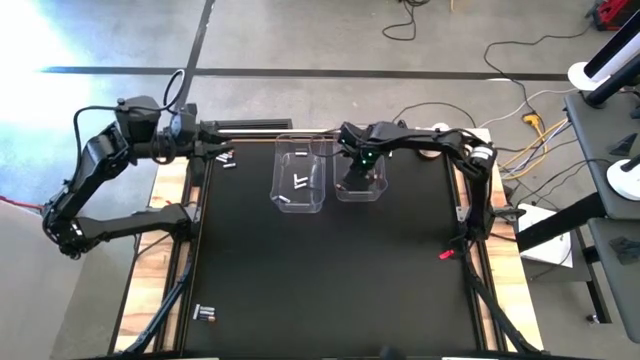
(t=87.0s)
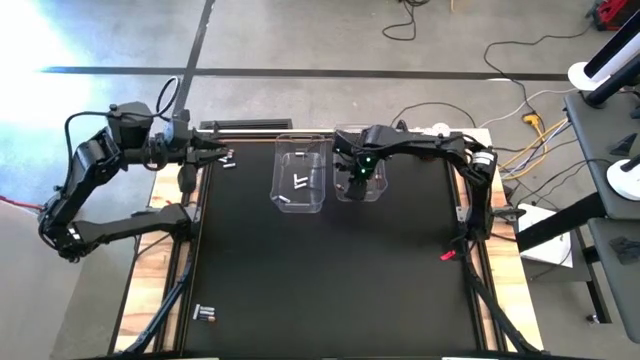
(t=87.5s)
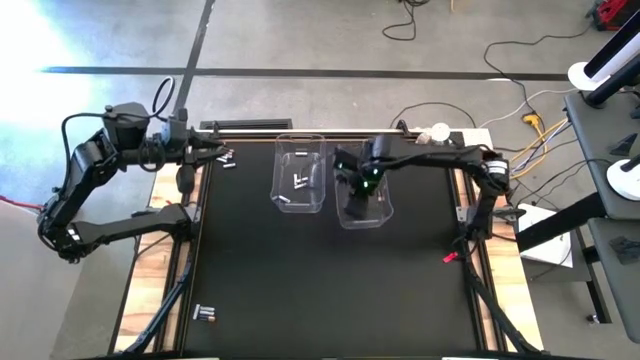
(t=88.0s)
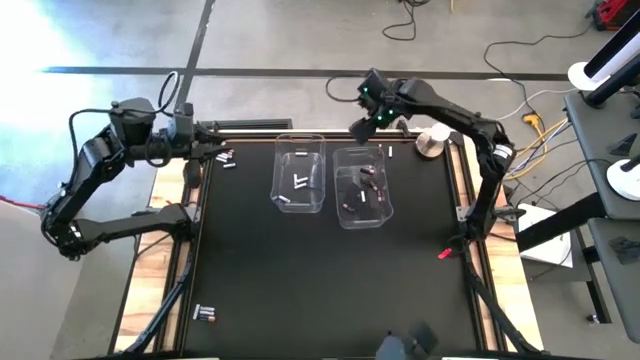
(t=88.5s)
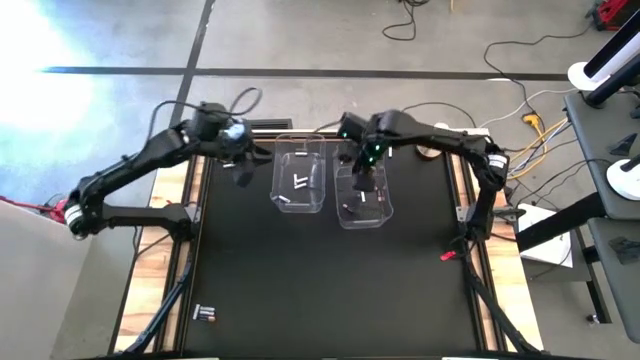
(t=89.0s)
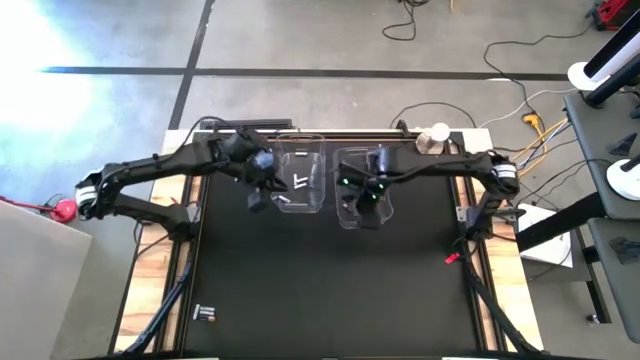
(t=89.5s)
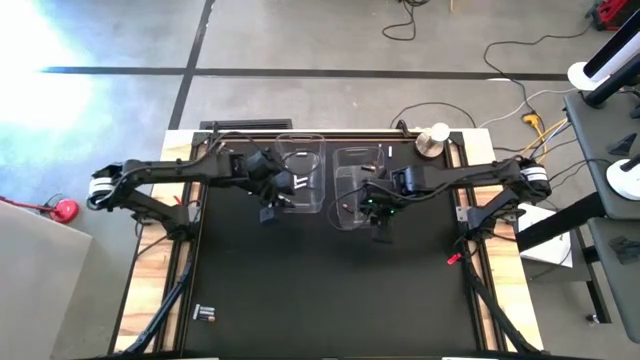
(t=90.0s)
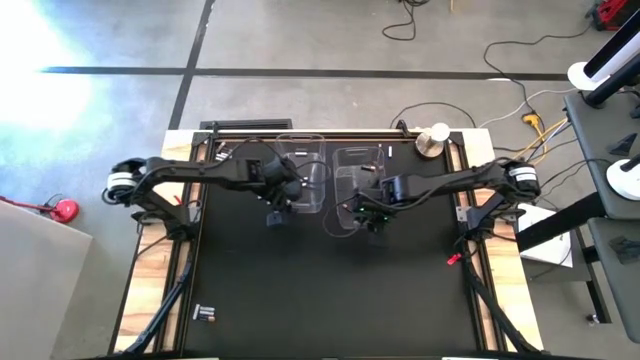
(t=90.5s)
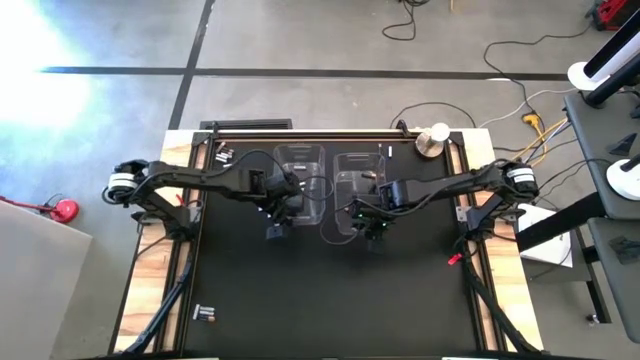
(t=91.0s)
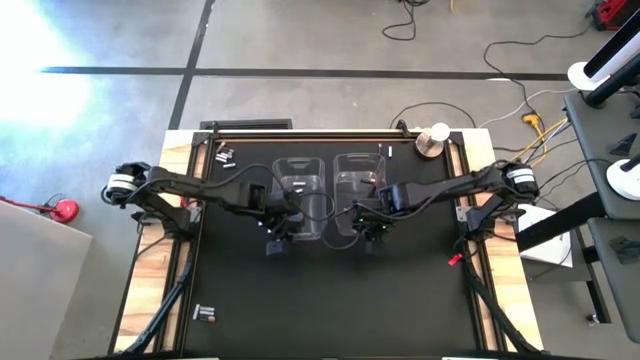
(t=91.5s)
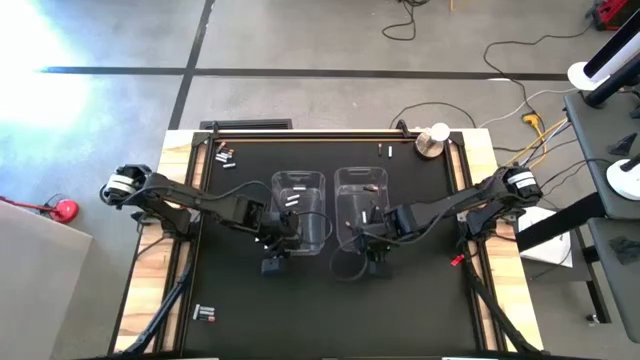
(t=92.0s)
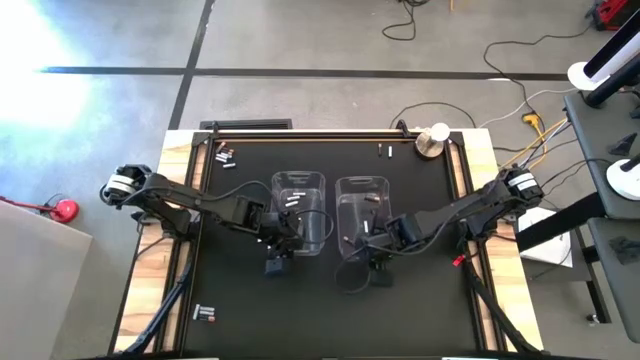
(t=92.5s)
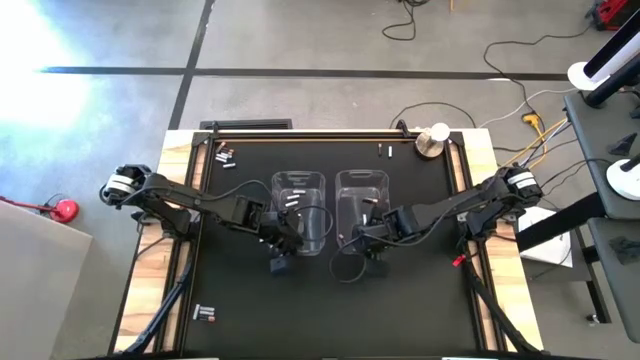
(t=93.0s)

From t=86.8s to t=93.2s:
Task: Sort batteries
Adjust the transparent bins

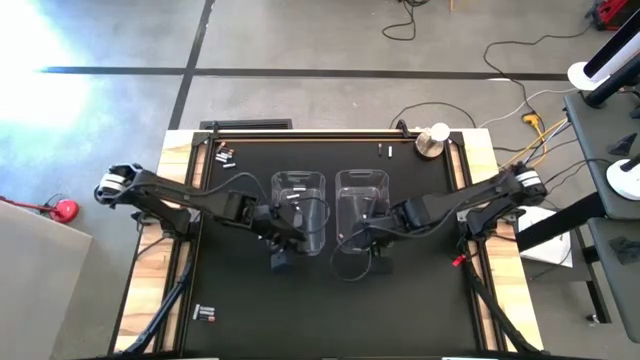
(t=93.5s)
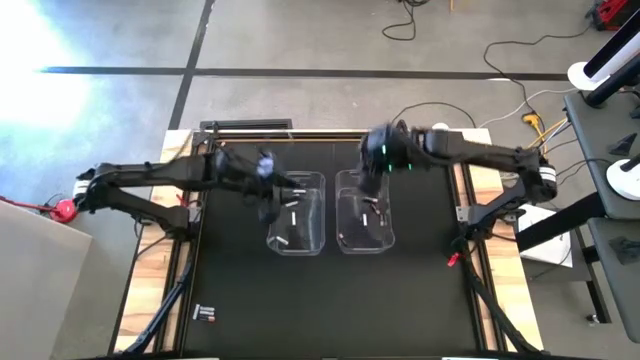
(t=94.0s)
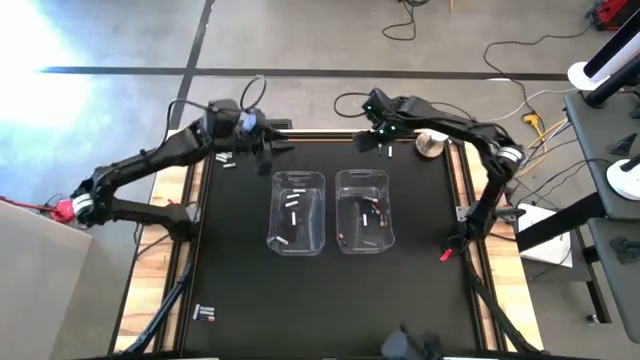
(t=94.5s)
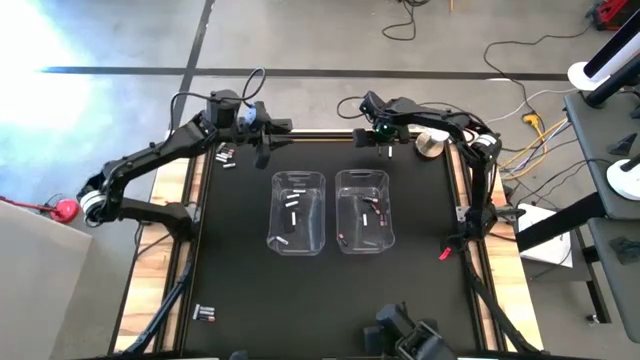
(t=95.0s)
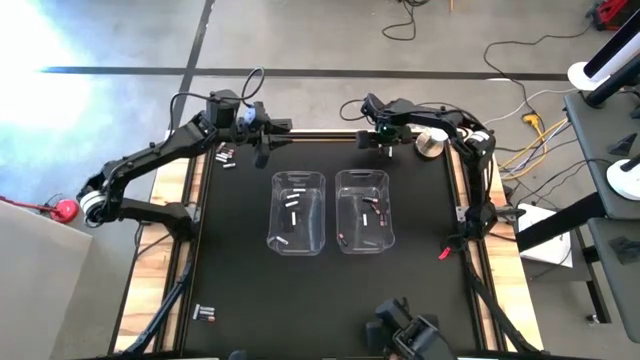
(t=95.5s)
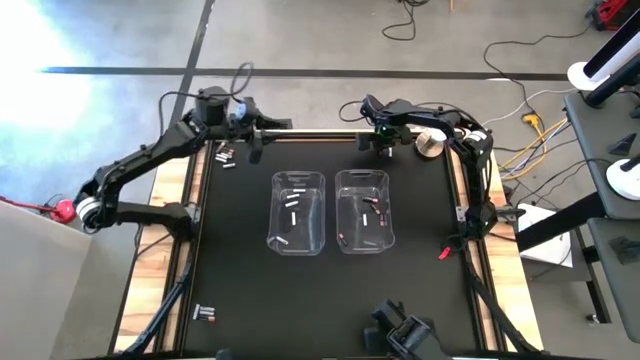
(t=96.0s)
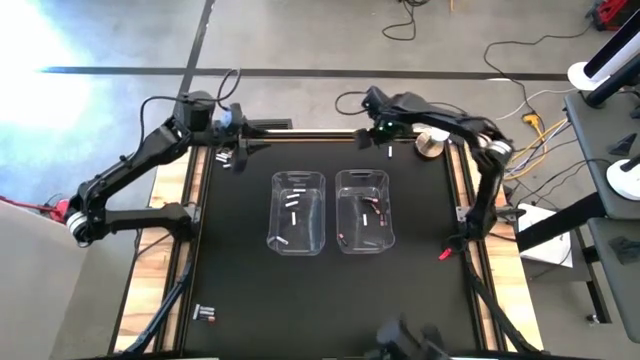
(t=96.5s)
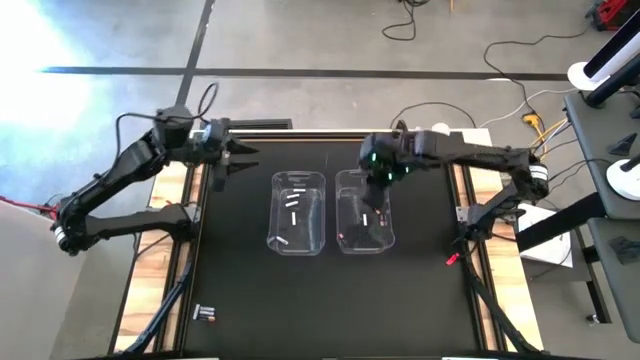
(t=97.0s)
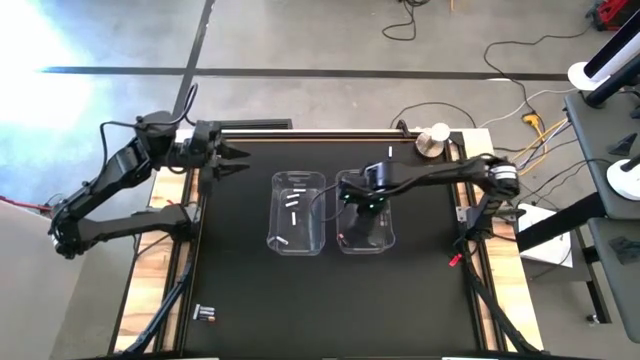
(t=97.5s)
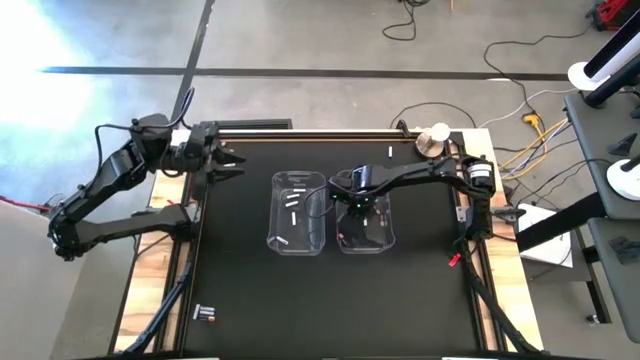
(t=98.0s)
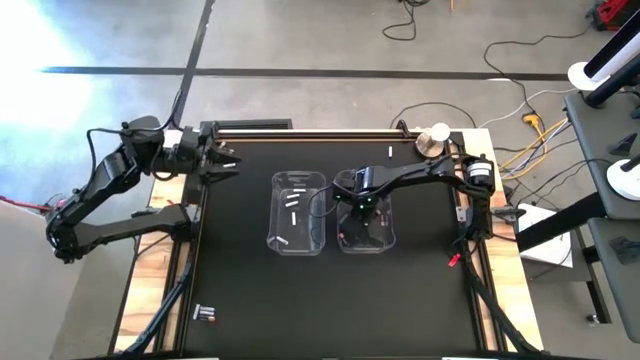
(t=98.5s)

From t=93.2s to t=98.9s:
Put the black battery into the right transparent bin

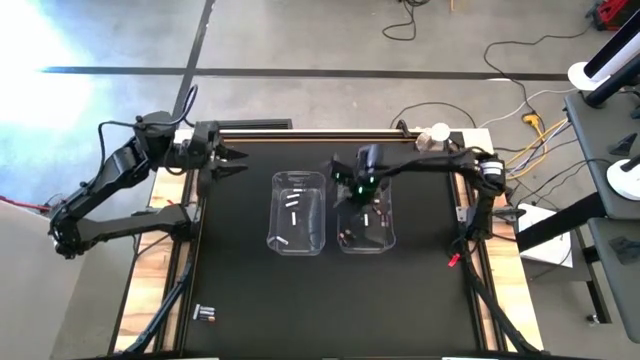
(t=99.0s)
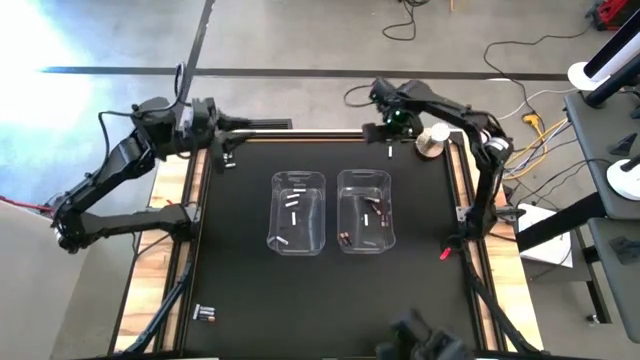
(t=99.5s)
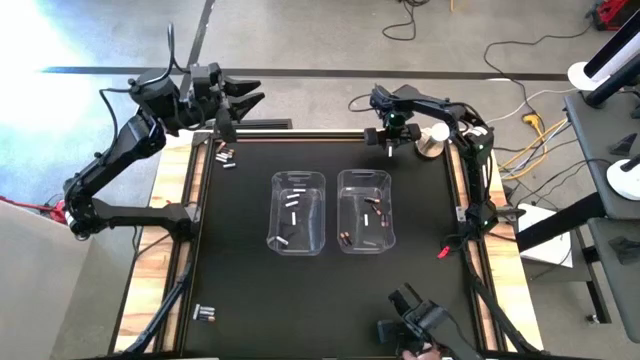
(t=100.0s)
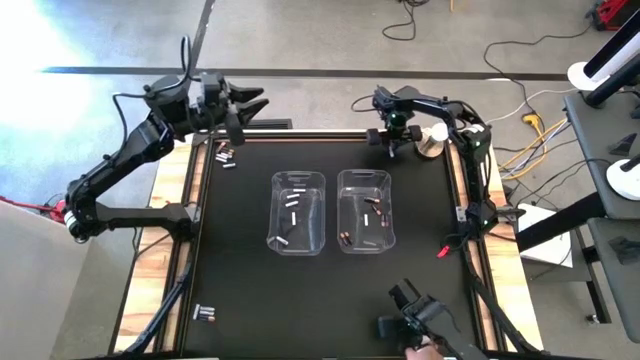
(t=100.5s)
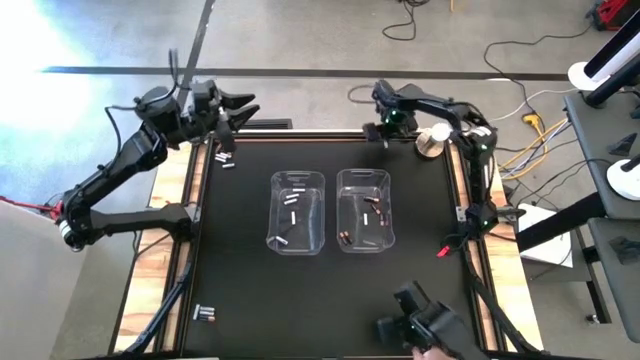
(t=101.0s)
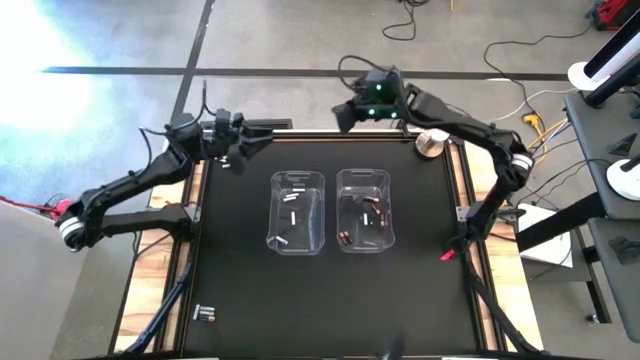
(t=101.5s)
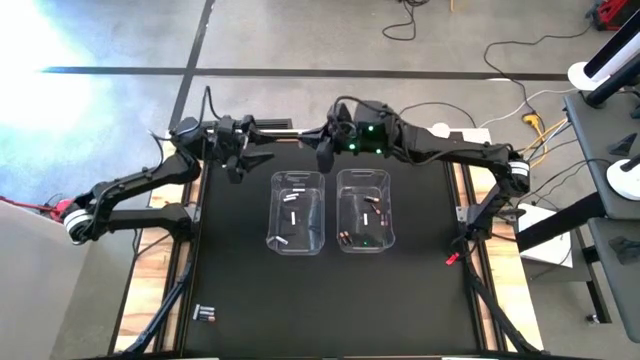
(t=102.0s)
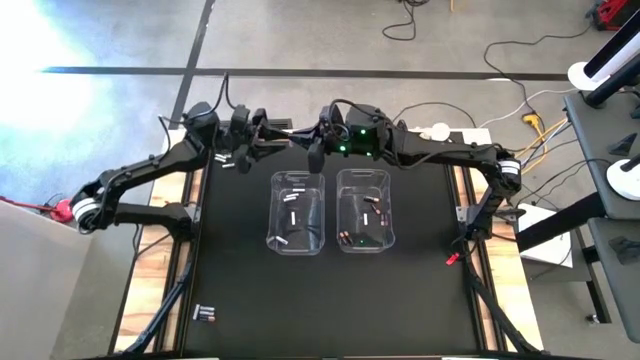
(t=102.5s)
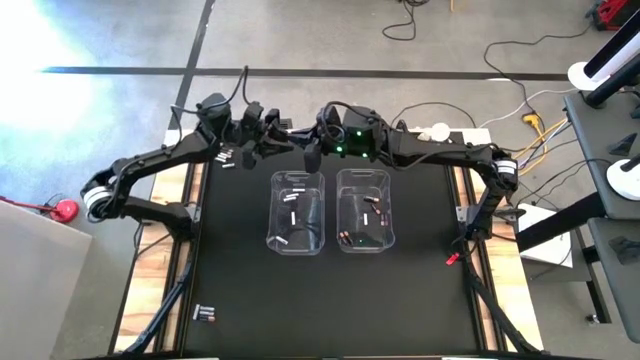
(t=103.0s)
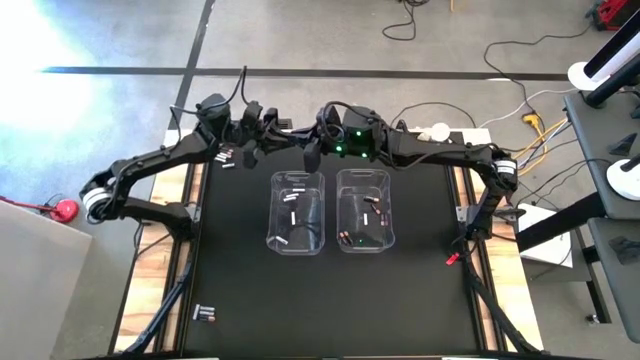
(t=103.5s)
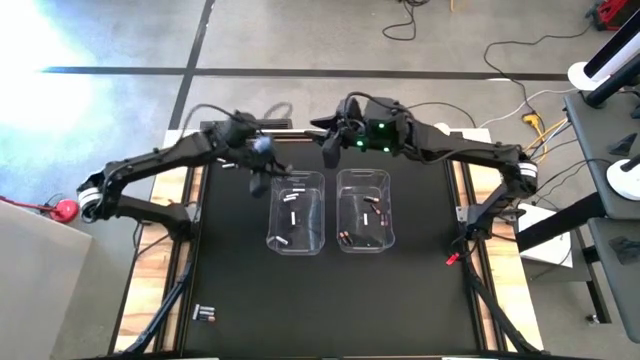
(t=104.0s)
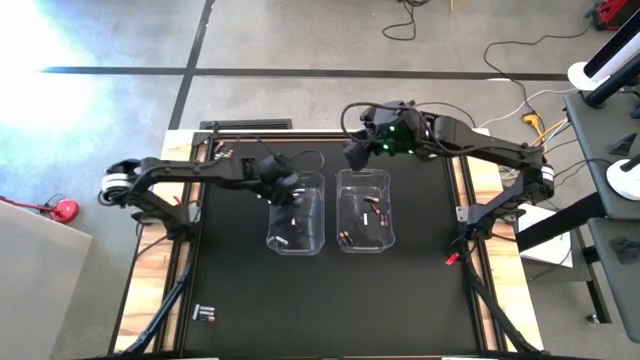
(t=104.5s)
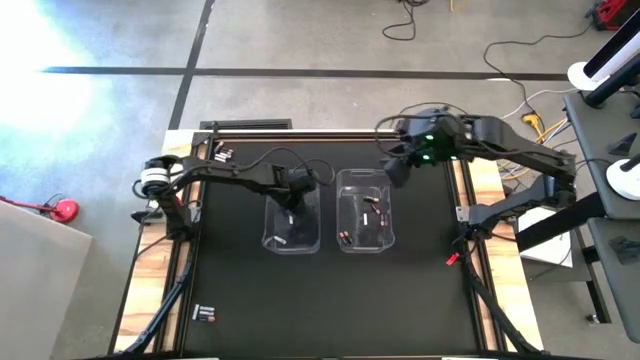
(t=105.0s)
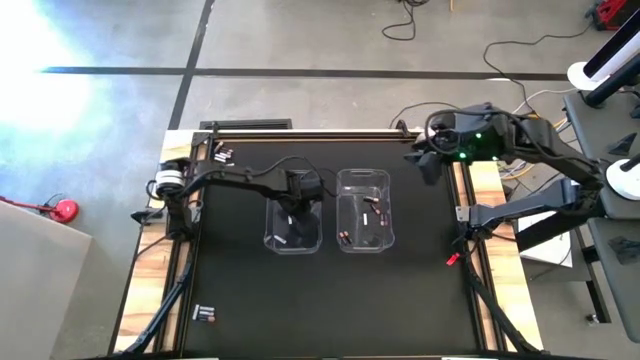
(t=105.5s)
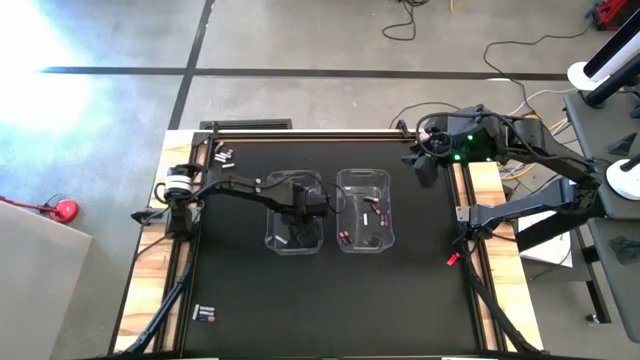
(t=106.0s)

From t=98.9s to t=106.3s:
Put the white battery into the left transparent bin
